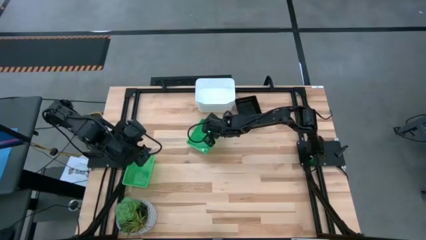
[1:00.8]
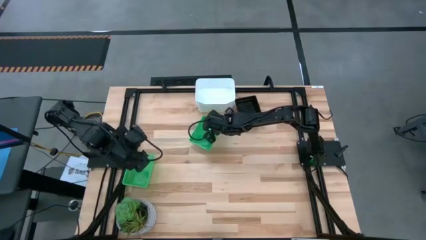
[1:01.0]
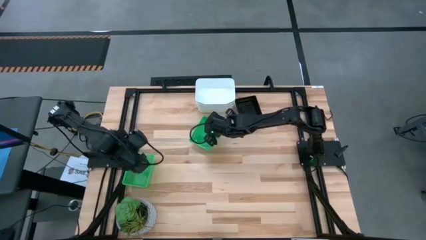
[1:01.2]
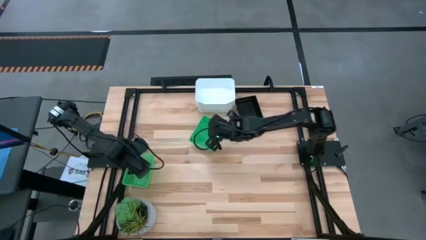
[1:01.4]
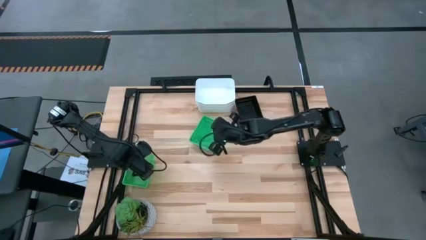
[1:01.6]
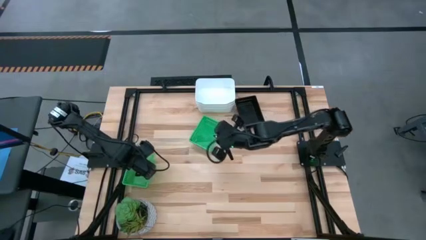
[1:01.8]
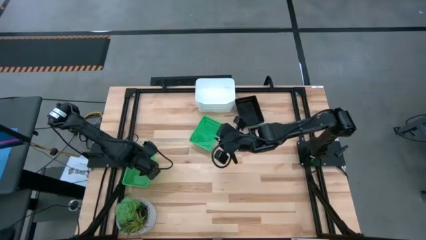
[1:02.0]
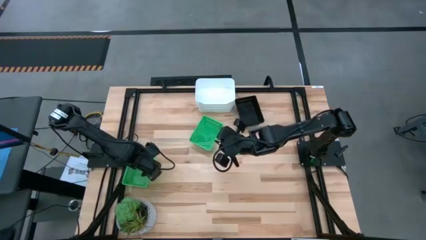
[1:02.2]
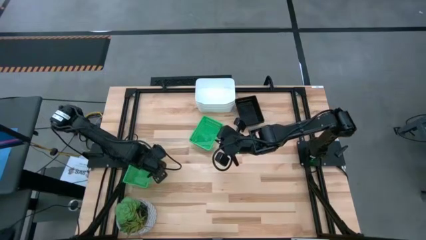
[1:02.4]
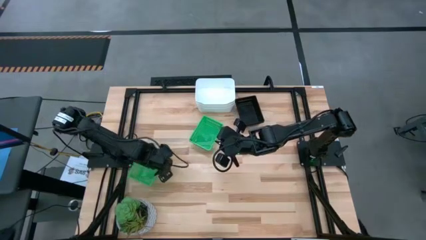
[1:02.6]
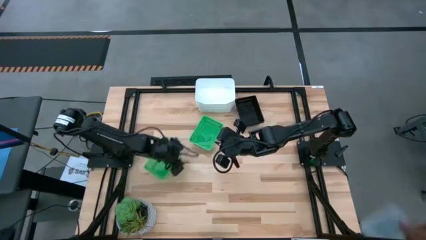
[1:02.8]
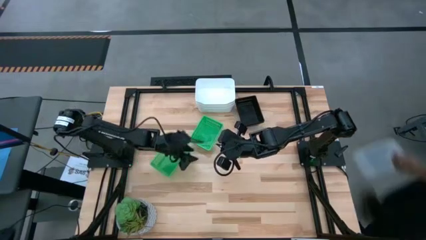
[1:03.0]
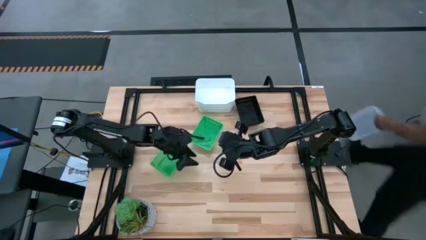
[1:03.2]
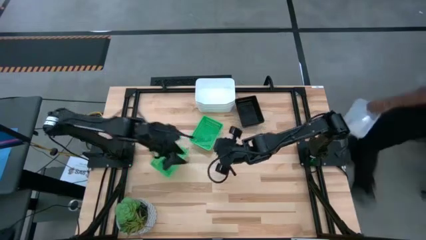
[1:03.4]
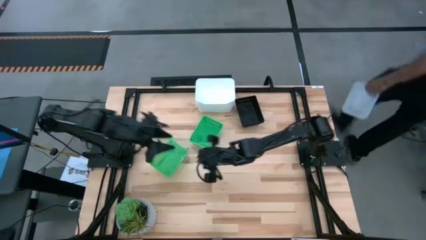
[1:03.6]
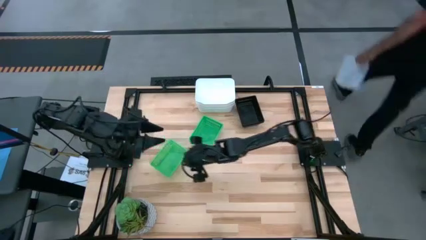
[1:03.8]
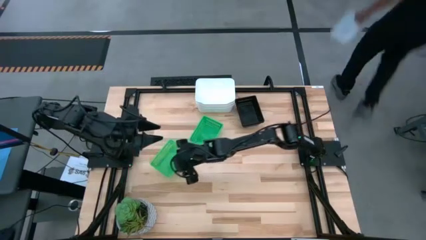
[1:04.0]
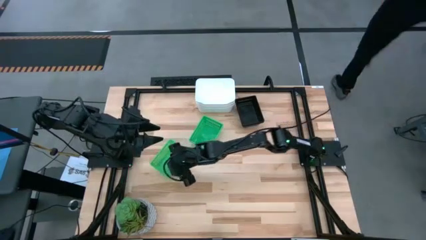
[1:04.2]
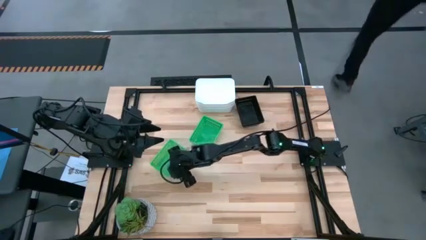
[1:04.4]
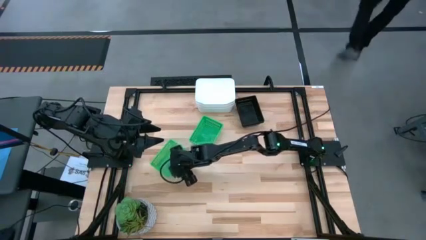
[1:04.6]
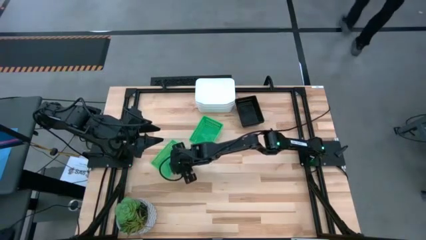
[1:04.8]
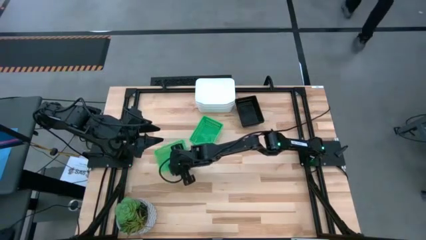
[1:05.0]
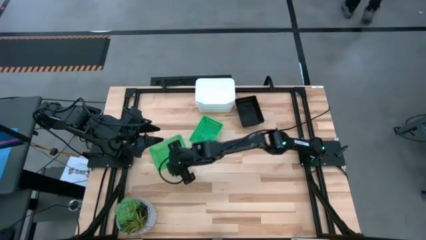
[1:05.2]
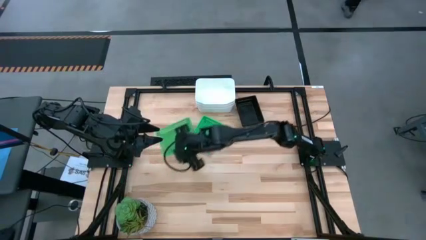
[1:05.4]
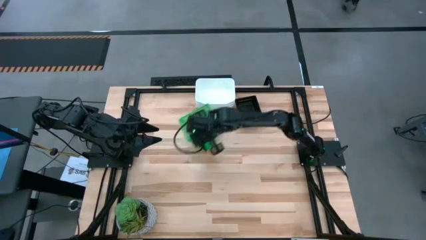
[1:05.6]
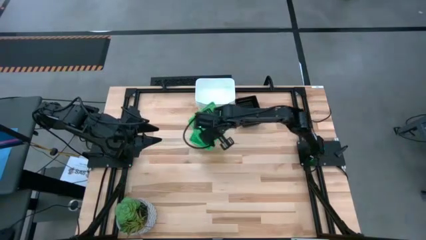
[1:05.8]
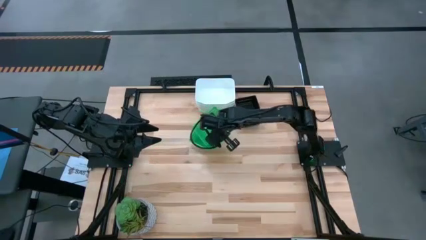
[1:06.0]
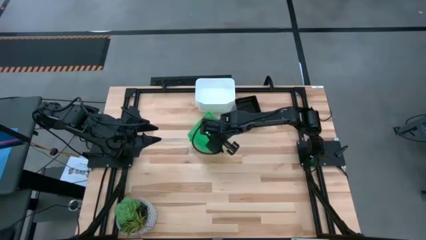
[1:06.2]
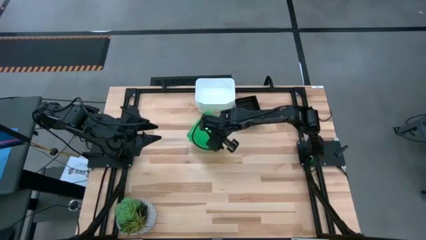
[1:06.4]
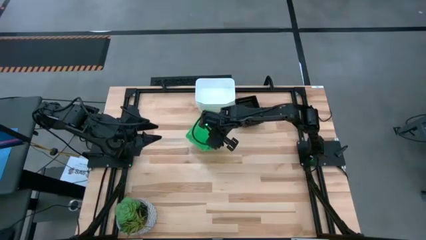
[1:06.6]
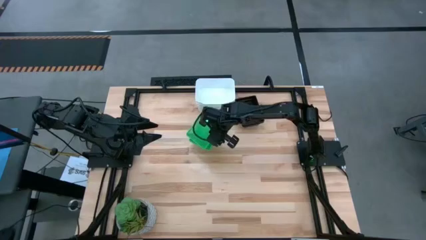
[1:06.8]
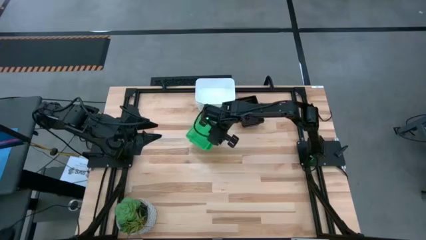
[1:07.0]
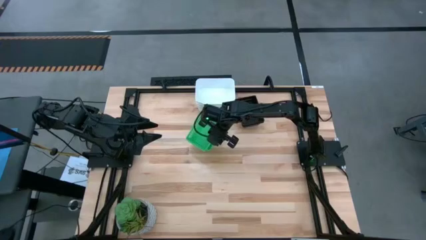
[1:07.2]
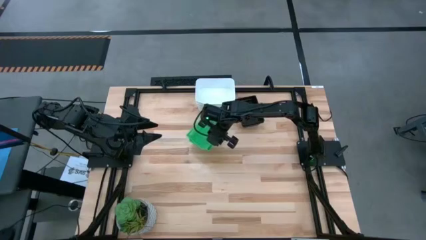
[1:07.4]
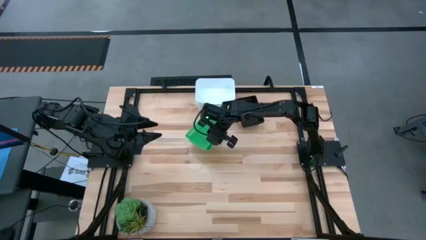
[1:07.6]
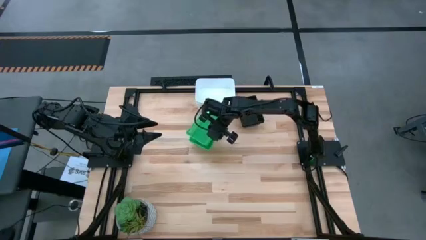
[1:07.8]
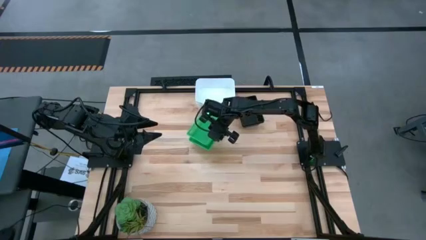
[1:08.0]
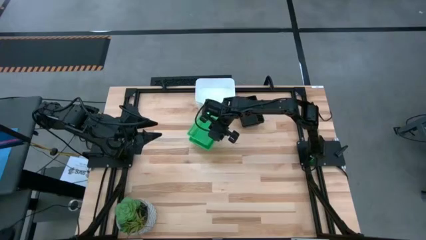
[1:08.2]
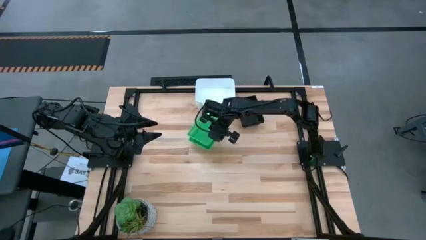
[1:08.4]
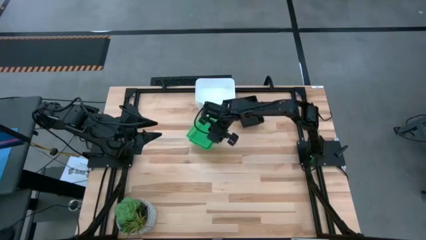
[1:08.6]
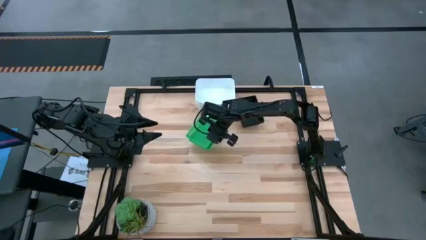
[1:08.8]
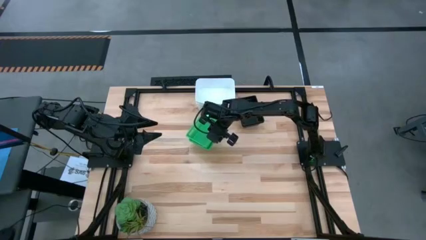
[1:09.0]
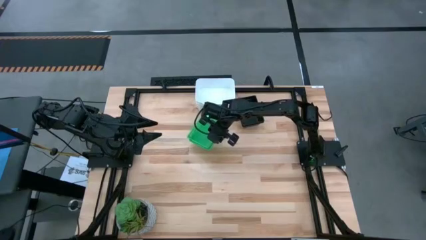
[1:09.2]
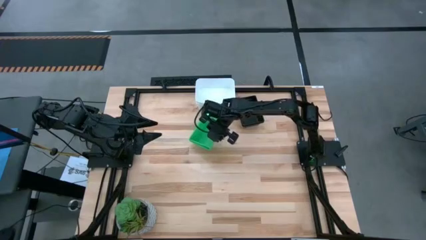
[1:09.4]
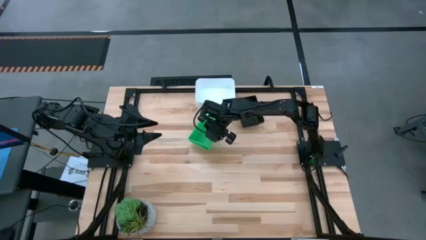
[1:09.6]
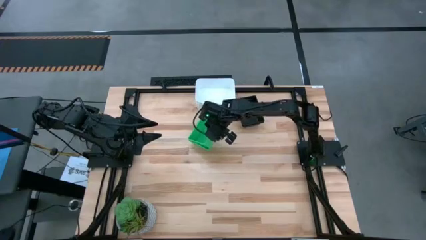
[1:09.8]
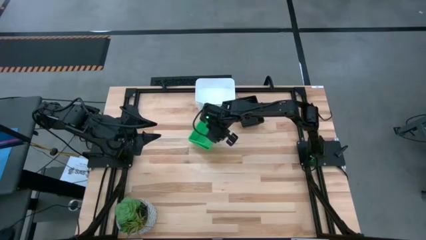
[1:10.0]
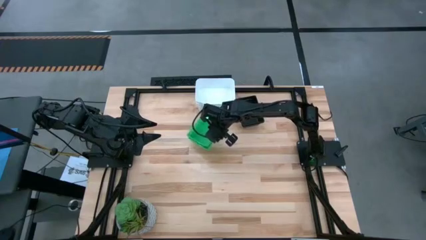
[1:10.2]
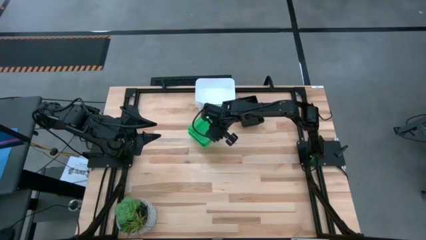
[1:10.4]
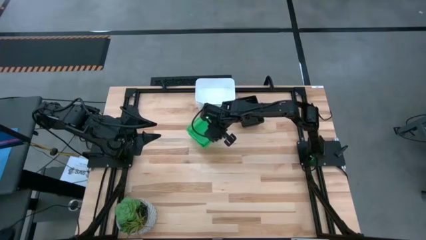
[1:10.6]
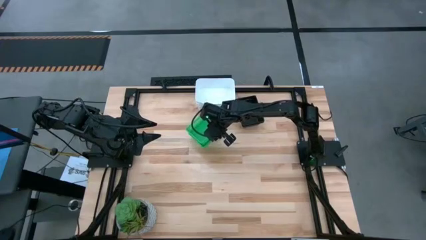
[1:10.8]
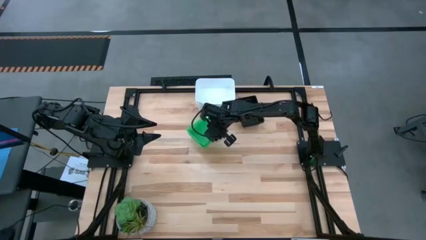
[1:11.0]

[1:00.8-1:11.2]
Stack the bottom green bin into the top green bin

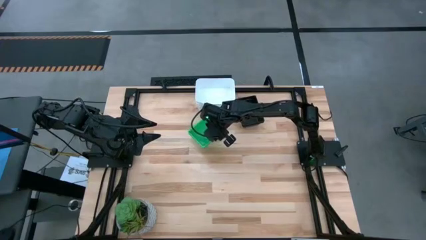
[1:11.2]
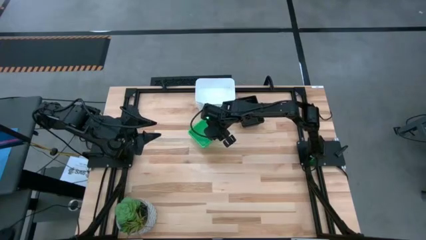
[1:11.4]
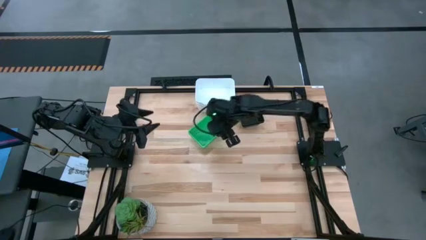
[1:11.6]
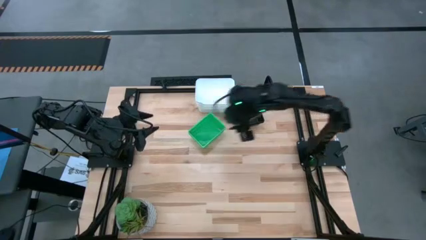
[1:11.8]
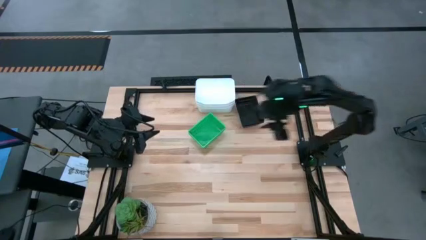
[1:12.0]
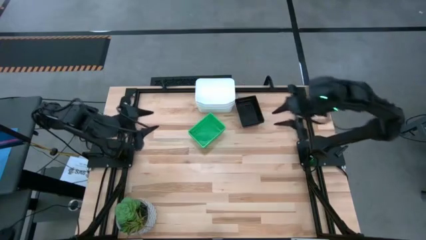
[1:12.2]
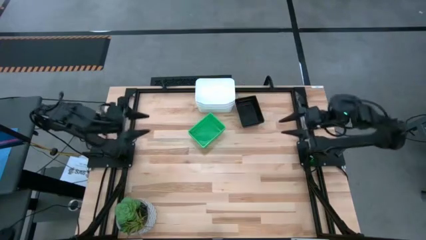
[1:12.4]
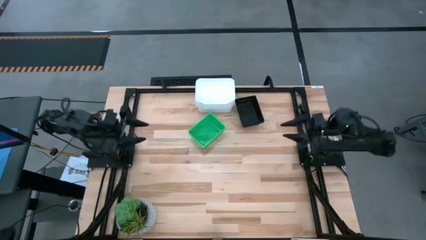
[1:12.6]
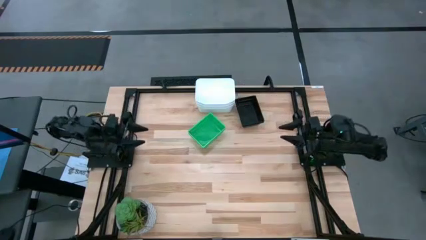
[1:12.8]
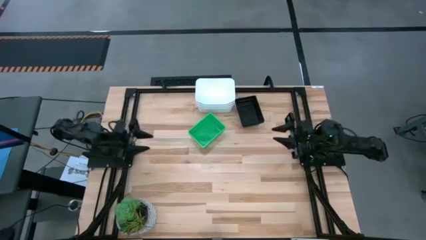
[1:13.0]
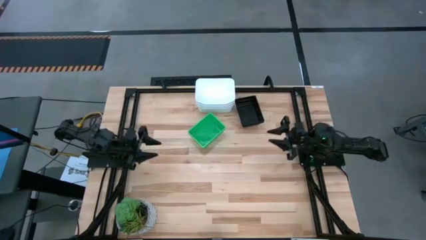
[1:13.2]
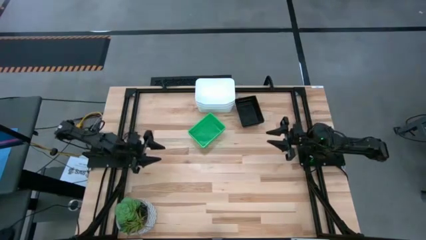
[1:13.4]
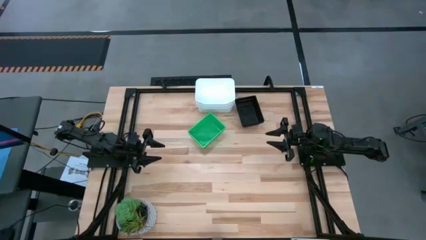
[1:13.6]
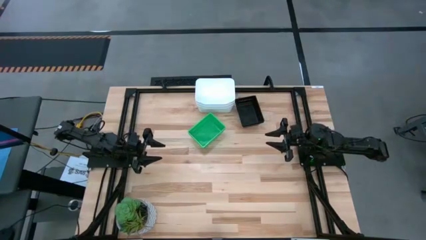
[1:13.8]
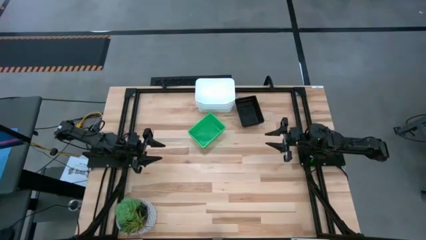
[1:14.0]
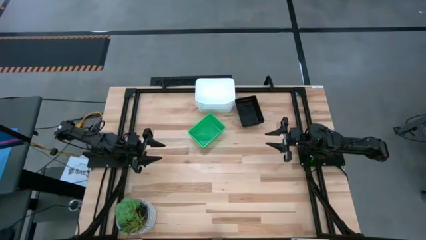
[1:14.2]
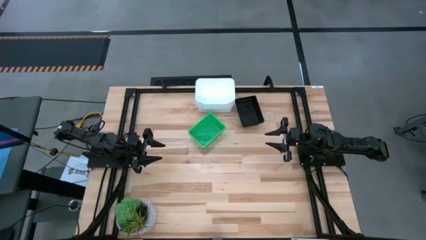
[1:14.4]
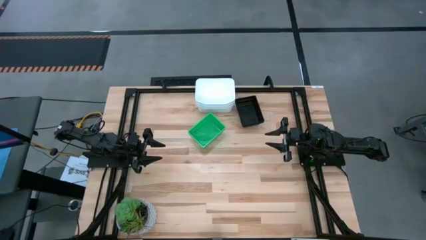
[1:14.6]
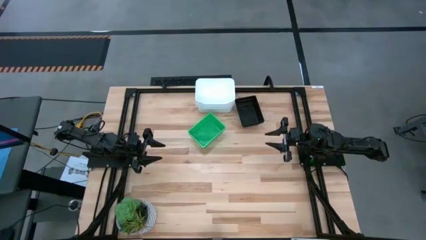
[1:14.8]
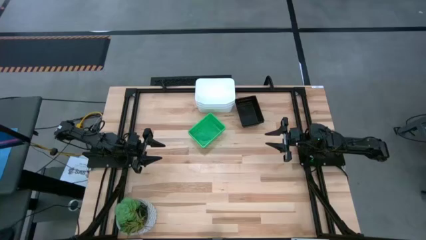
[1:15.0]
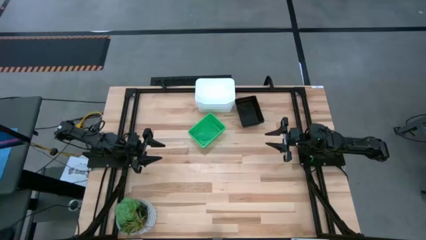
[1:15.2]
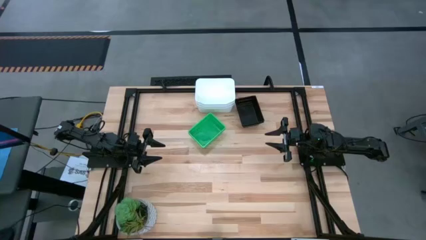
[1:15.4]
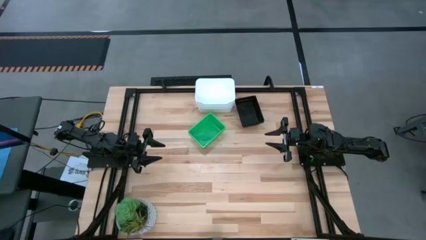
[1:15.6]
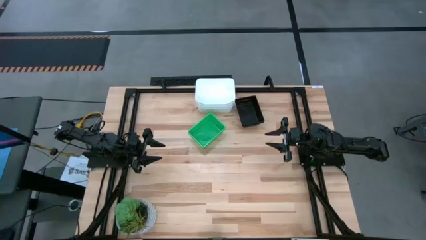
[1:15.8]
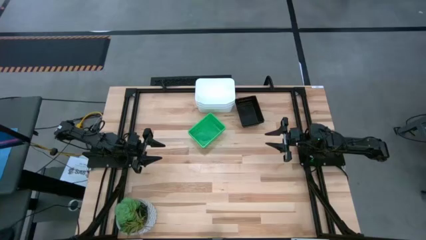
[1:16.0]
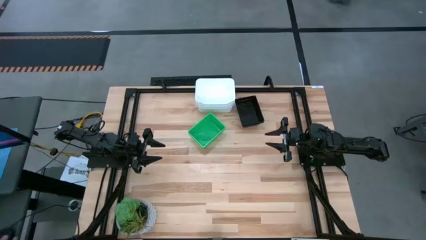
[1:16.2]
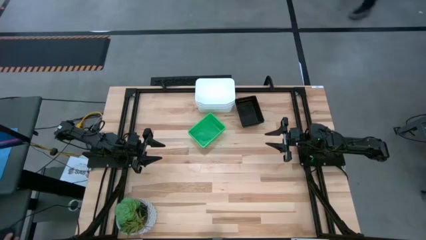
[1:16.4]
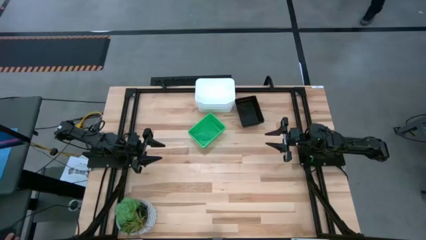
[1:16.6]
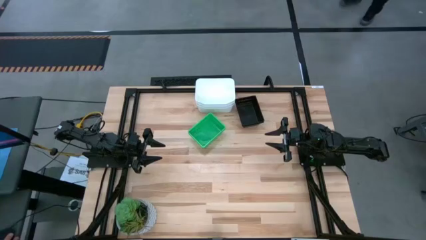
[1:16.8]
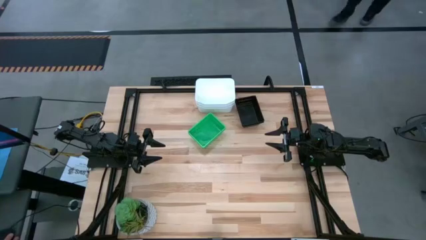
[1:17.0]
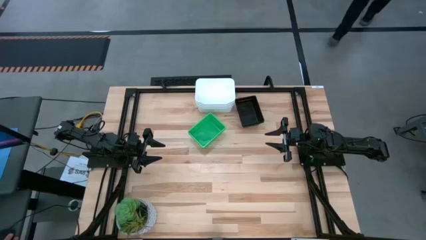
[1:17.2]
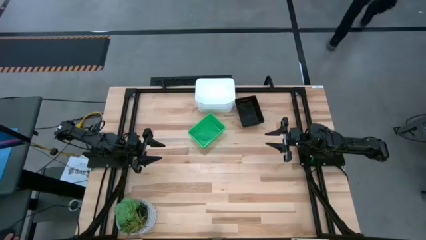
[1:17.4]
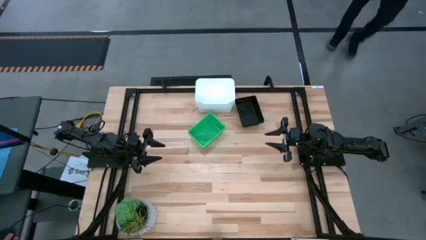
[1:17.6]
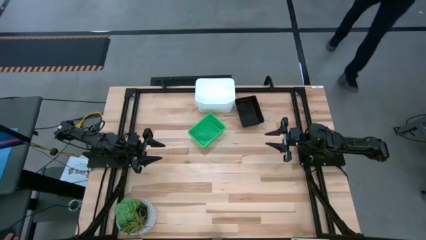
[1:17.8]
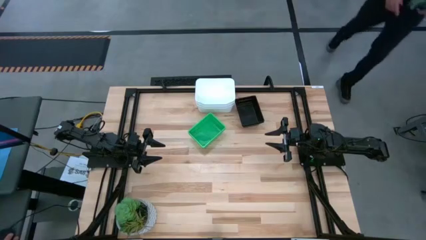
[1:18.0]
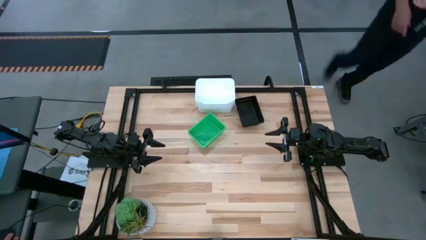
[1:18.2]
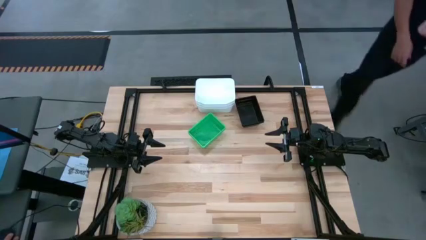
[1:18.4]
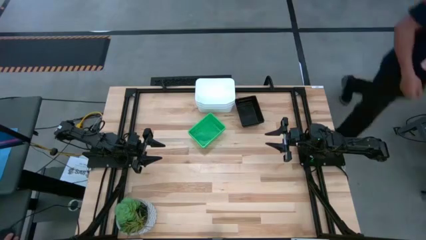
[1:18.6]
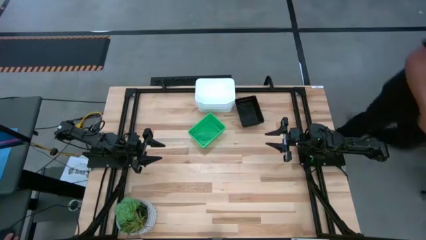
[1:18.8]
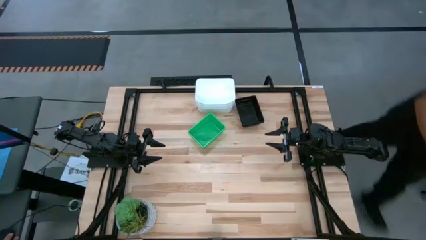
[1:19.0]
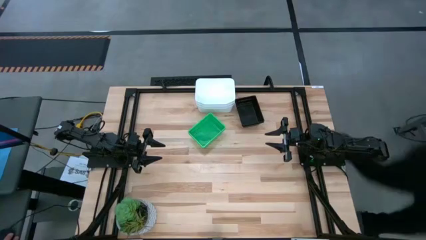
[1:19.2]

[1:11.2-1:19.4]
Return to Home Position
